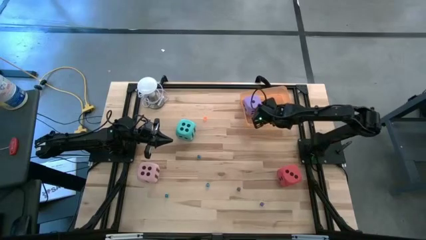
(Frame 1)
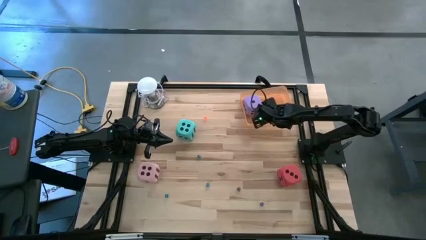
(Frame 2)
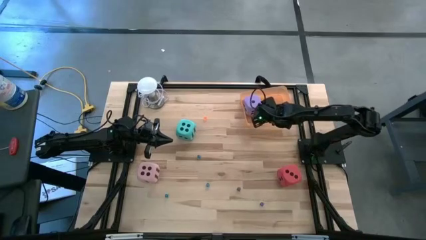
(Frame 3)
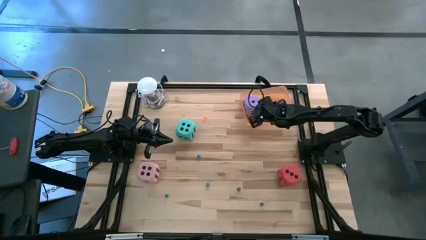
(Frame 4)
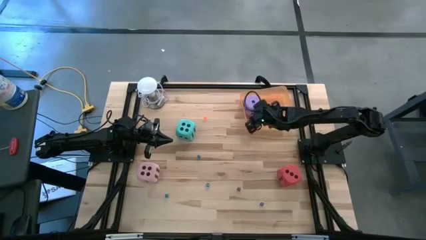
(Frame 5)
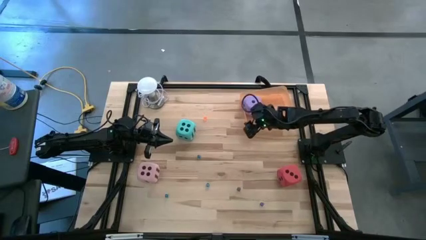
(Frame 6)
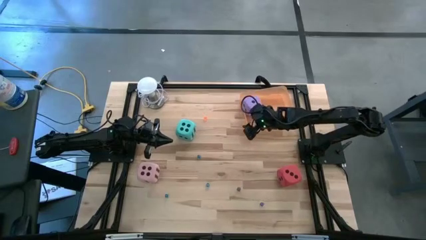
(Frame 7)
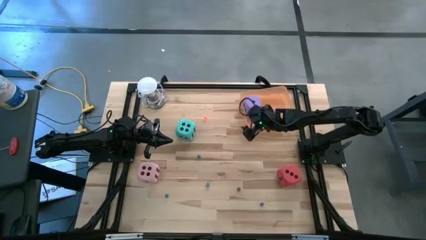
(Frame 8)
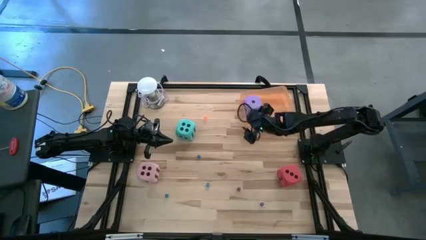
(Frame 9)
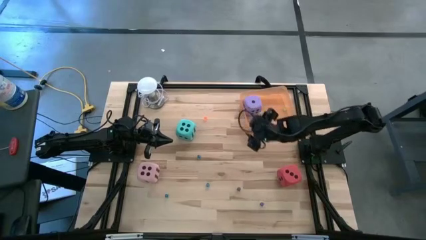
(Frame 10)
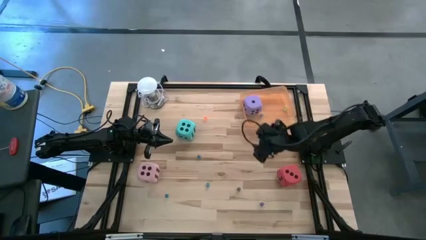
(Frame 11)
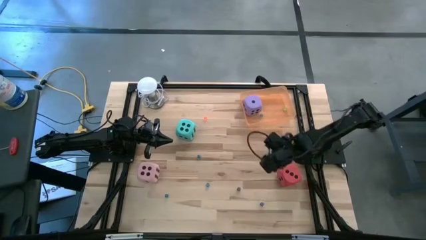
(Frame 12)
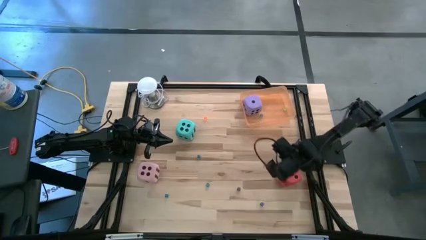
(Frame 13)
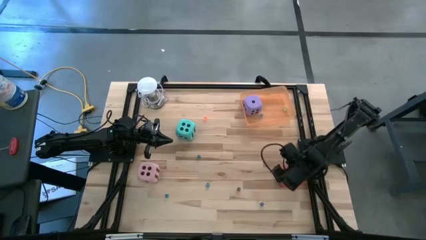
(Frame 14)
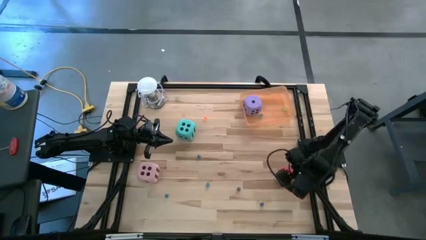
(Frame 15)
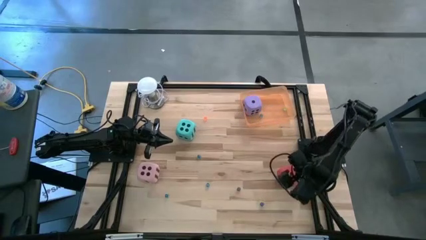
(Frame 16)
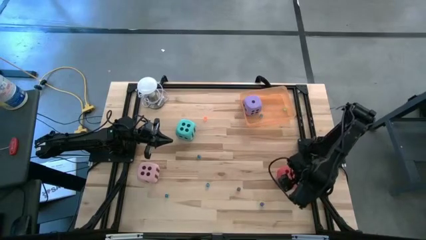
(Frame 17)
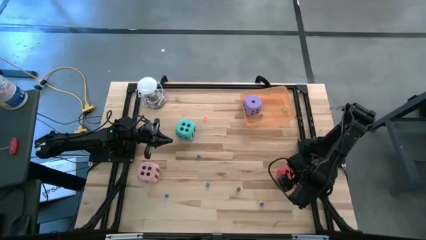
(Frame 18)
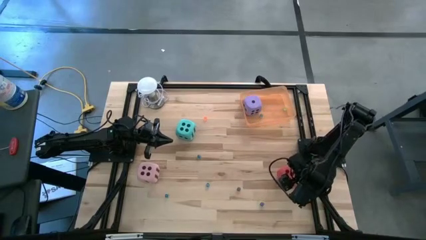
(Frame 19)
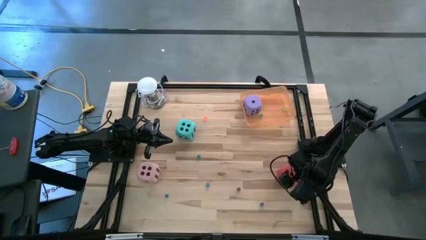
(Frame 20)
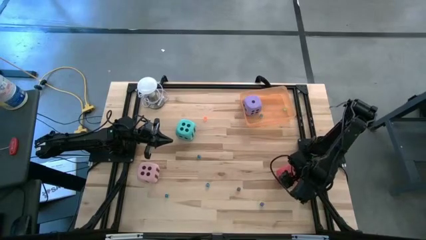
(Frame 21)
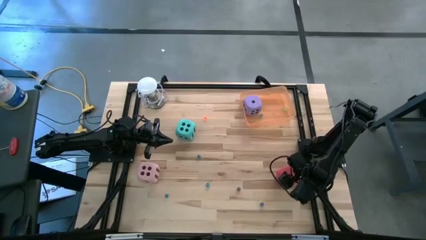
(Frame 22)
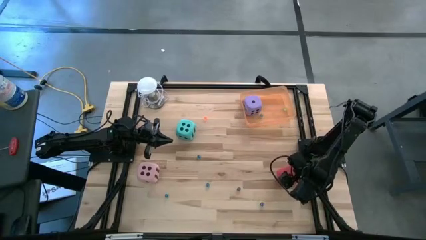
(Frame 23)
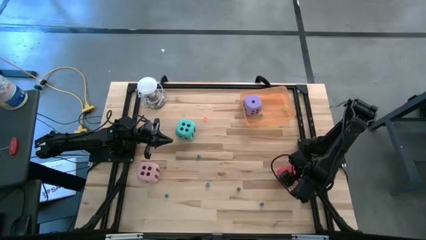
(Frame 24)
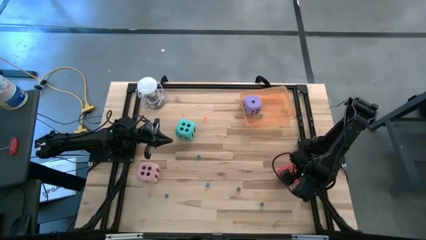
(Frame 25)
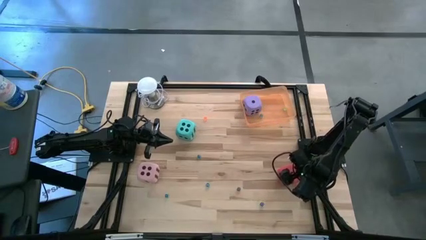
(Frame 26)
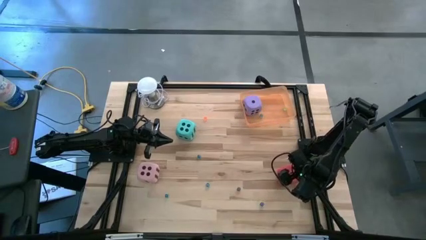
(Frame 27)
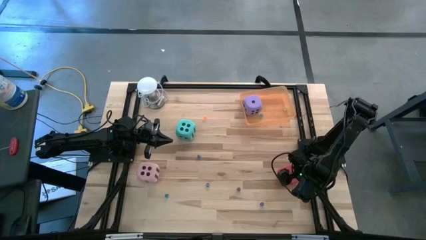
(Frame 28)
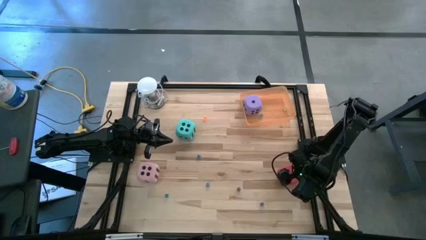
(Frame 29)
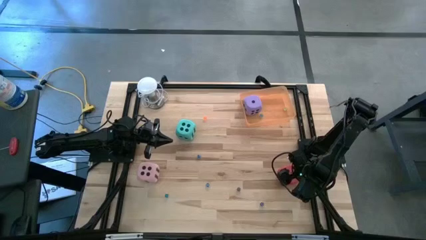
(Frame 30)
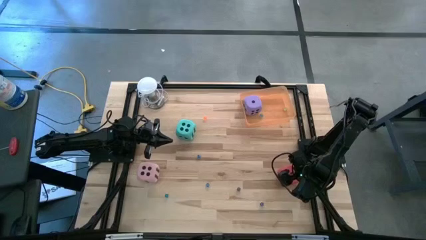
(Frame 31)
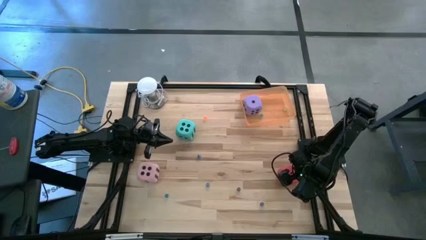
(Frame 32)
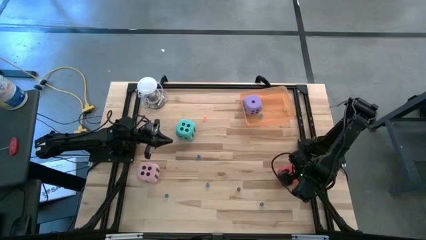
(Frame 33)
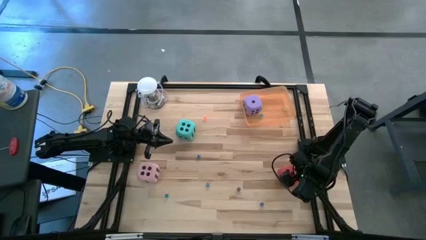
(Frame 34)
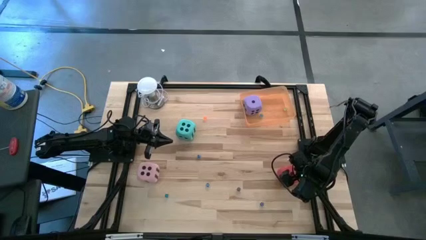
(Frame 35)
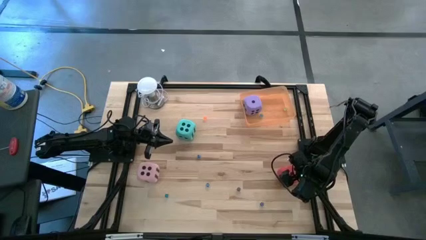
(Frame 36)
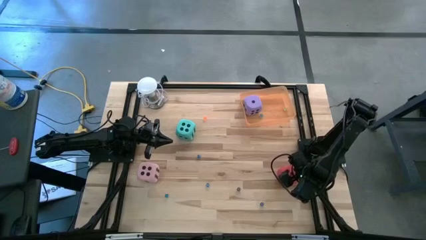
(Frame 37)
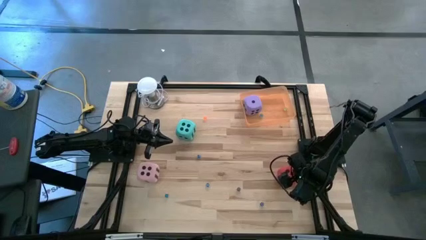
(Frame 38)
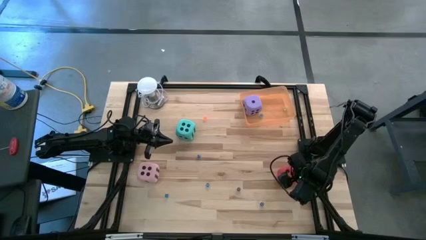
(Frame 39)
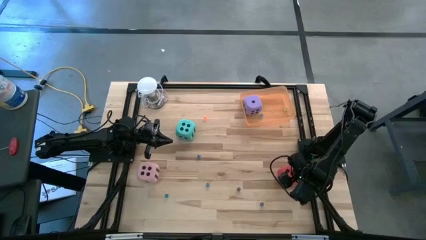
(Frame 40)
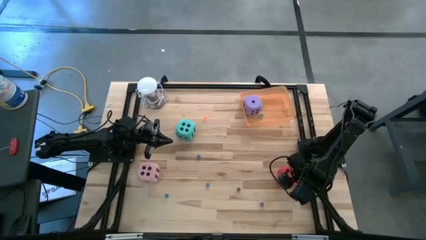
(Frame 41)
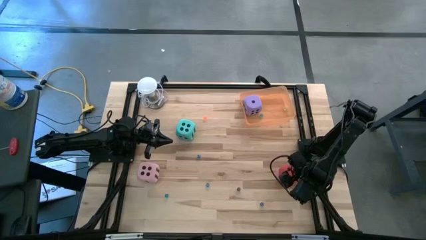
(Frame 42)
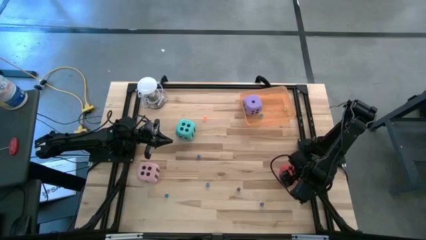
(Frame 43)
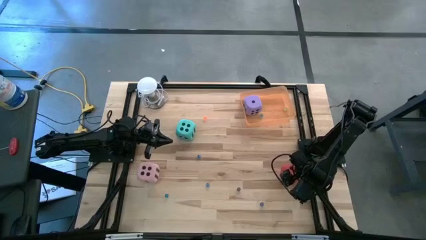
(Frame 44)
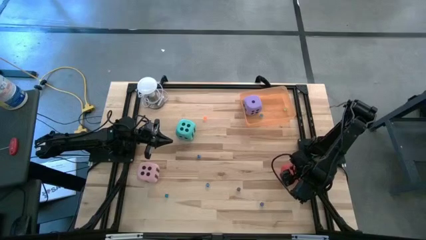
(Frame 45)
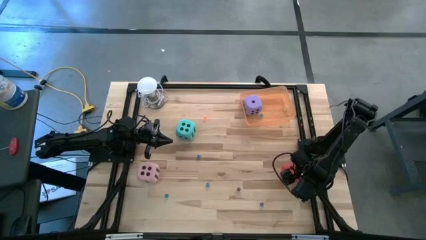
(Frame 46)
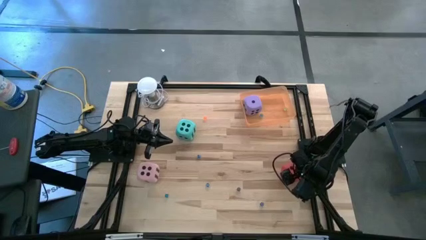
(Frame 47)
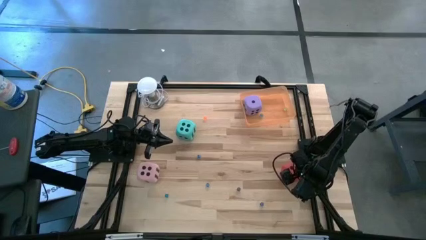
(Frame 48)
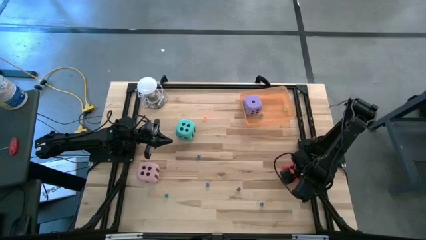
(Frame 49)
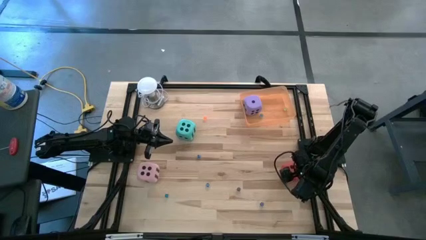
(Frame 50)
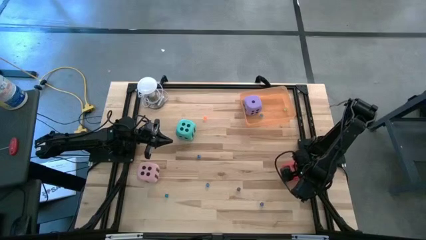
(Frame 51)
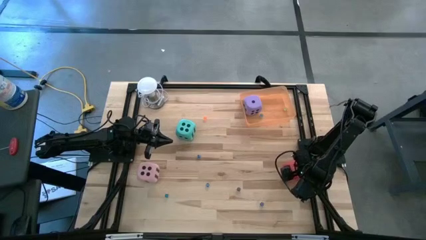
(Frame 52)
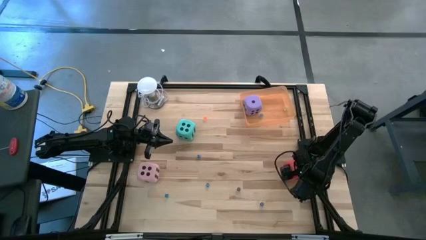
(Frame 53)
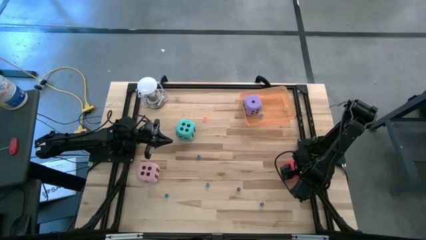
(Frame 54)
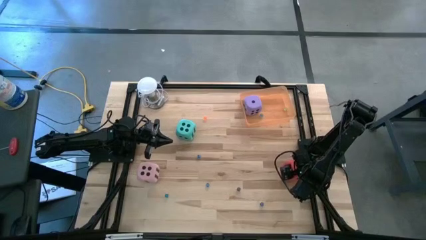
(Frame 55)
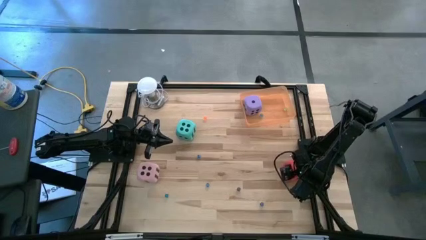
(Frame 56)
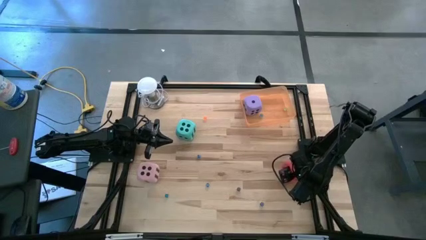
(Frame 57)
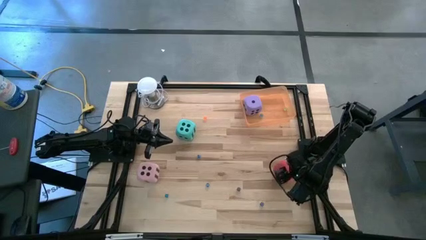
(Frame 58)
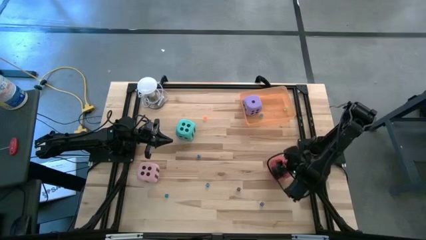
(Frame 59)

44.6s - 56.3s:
Task: Pick & Place Dice
Put the large red die into the the orange bin

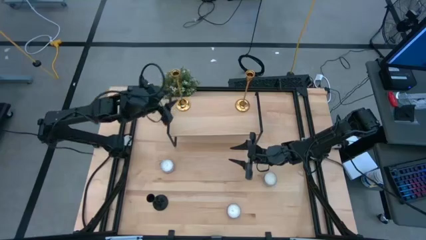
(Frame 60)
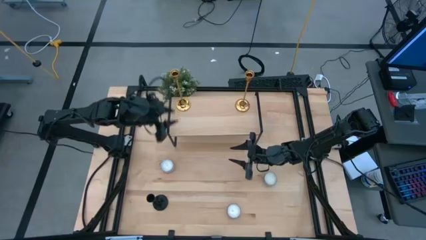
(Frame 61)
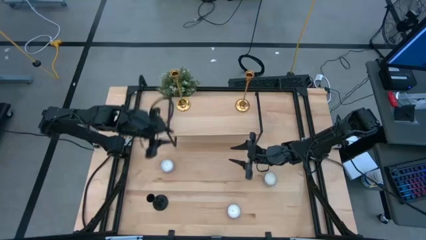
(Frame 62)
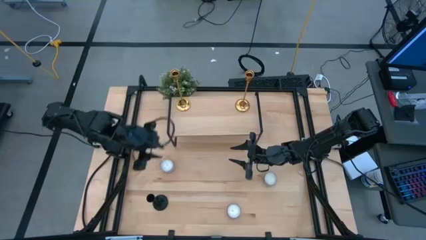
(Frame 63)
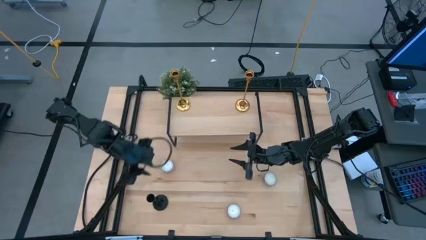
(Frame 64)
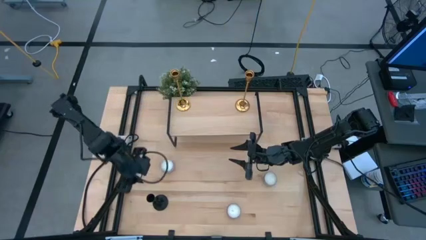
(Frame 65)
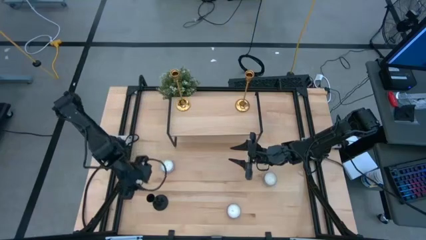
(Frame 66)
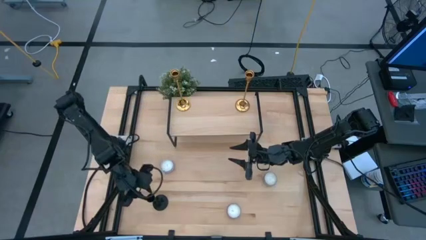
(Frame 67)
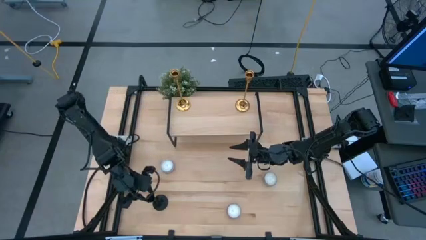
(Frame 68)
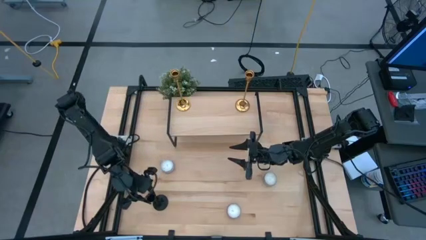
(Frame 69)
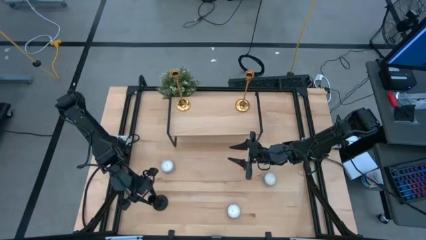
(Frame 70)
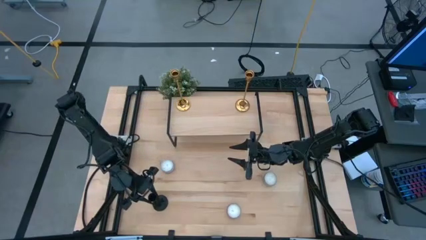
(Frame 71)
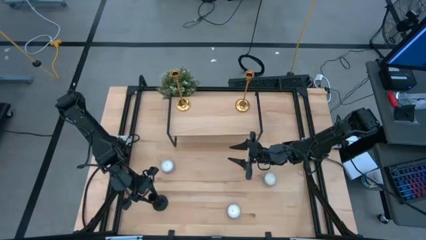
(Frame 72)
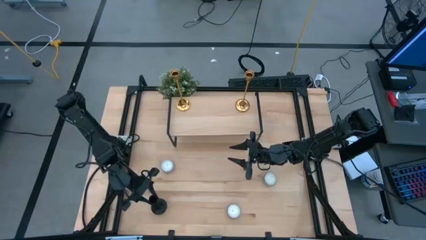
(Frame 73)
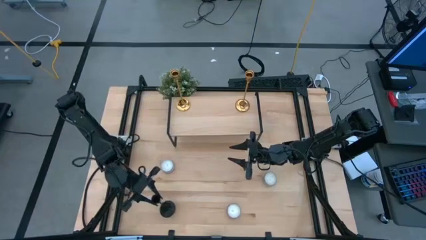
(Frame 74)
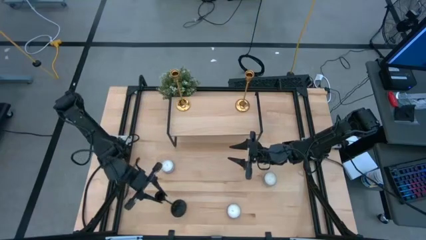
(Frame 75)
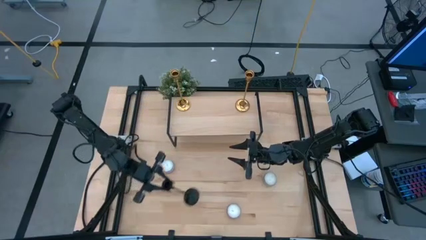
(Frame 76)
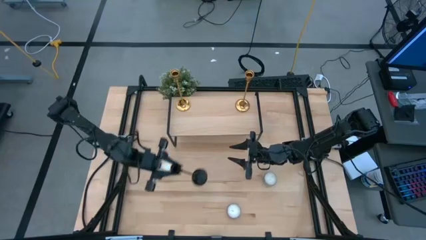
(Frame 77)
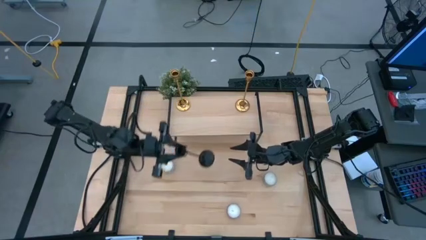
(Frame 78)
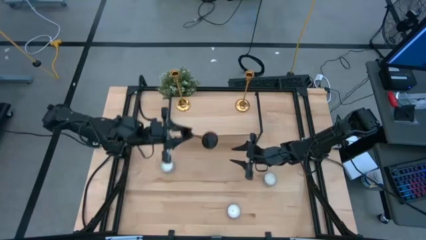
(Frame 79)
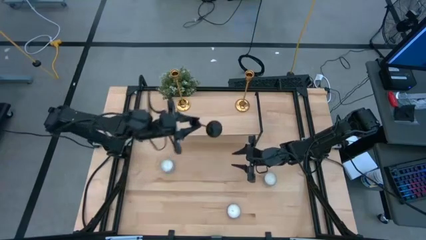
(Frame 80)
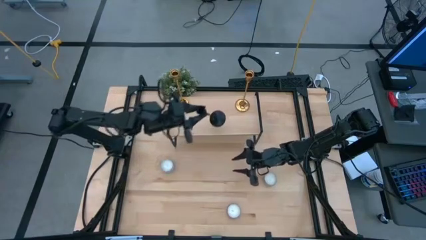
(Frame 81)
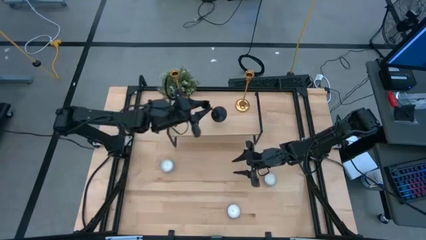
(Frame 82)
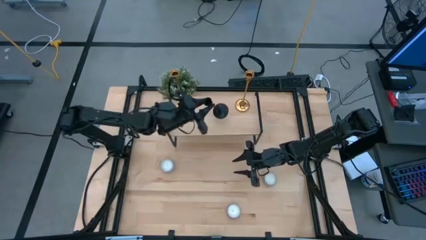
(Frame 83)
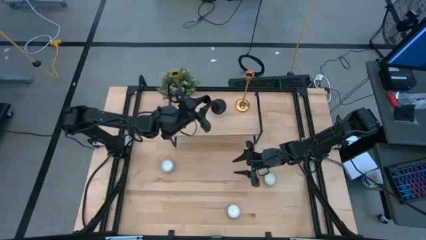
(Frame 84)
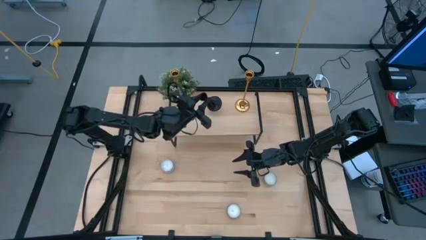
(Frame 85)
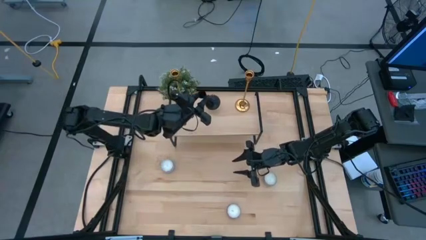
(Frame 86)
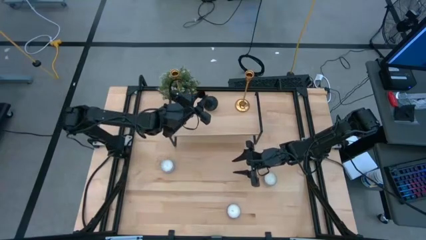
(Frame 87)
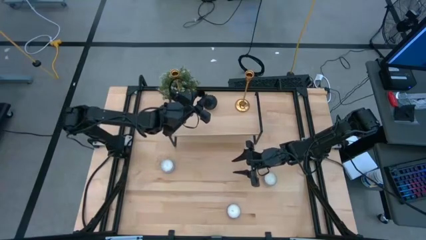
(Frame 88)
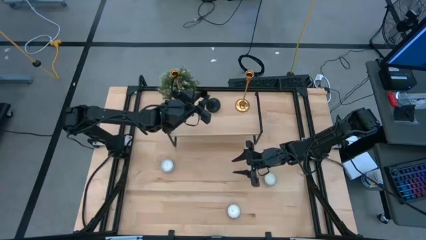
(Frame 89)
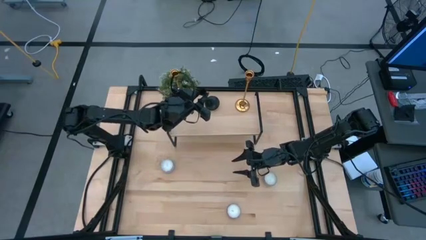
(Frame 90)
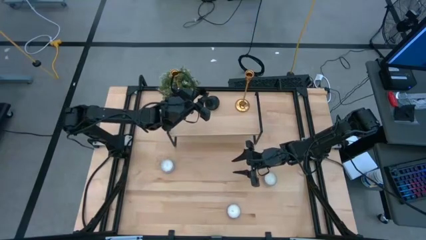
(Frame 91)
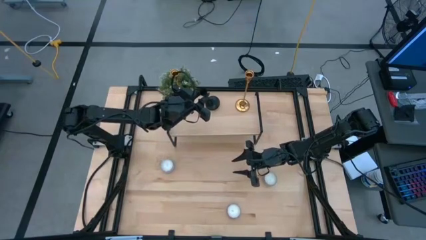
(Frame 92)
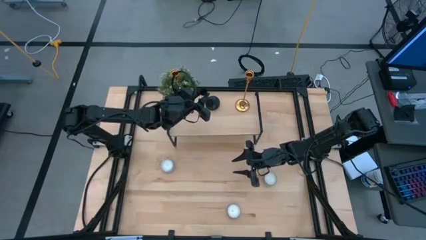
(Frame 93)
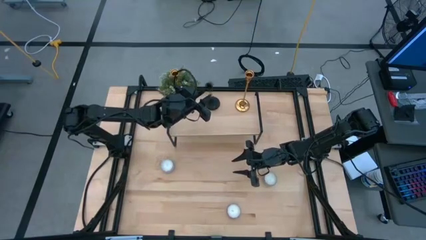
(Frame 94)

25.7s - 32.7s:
Task: Pick & Place candle stick holders
Put the black candle holder on the shelf
